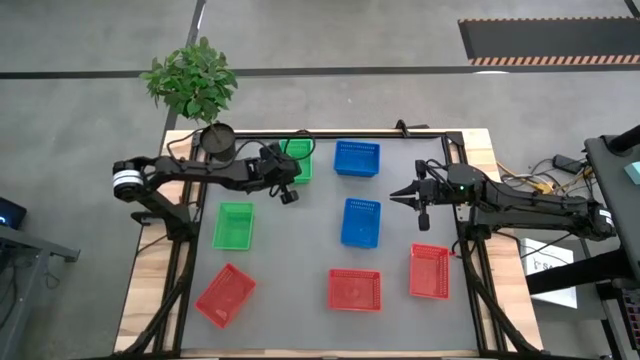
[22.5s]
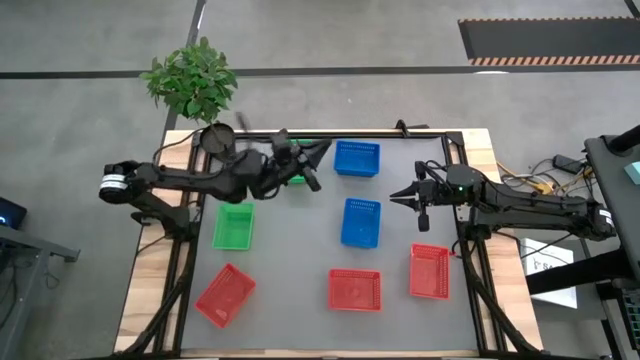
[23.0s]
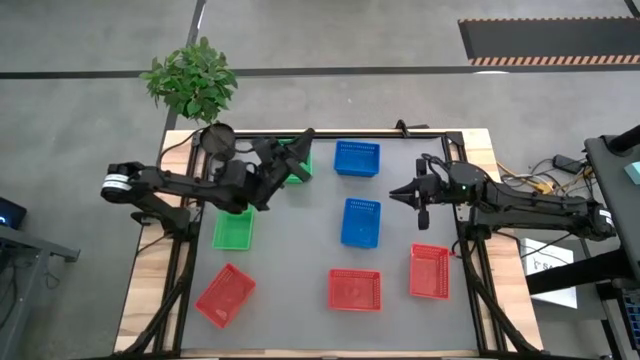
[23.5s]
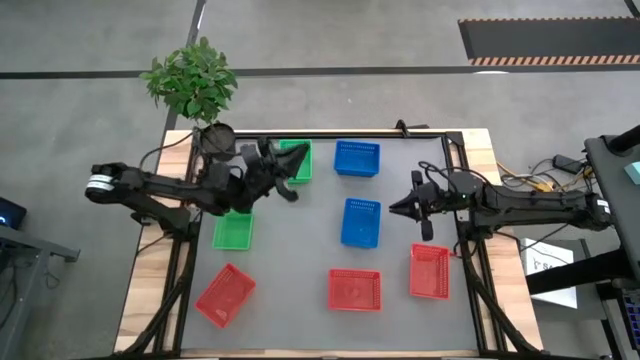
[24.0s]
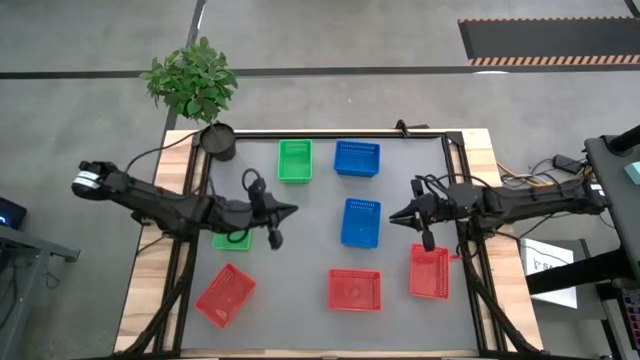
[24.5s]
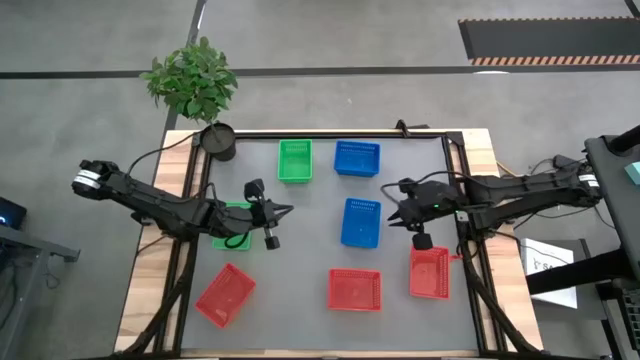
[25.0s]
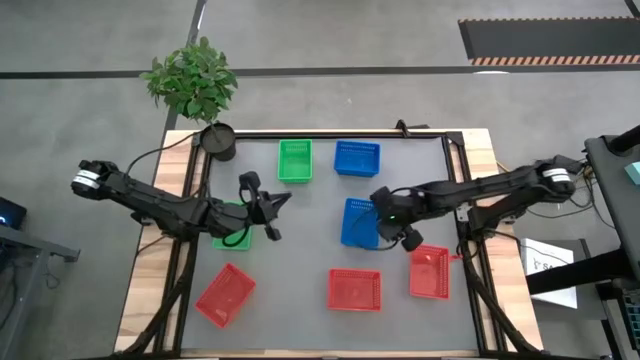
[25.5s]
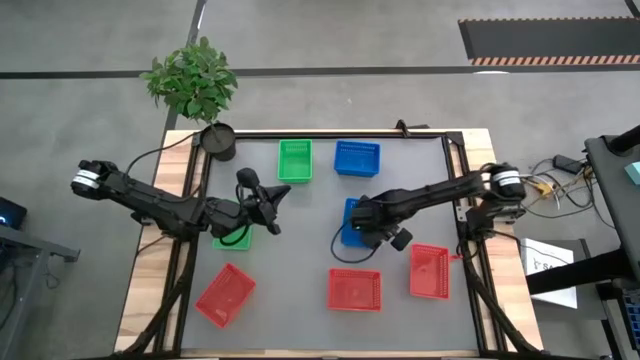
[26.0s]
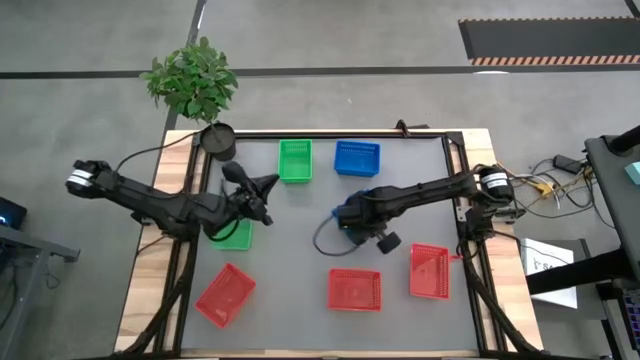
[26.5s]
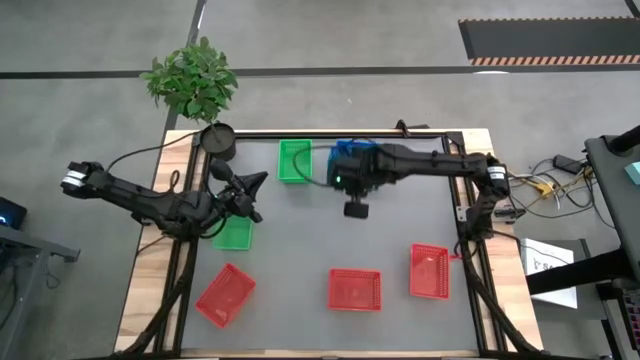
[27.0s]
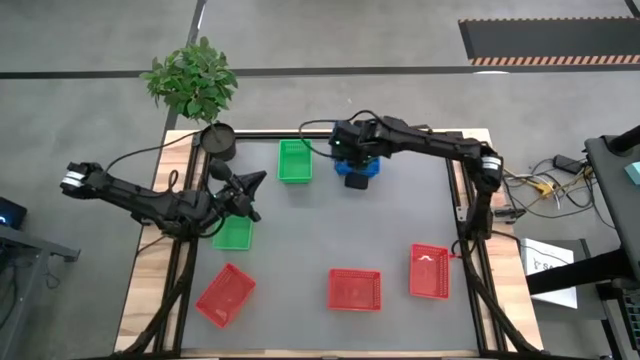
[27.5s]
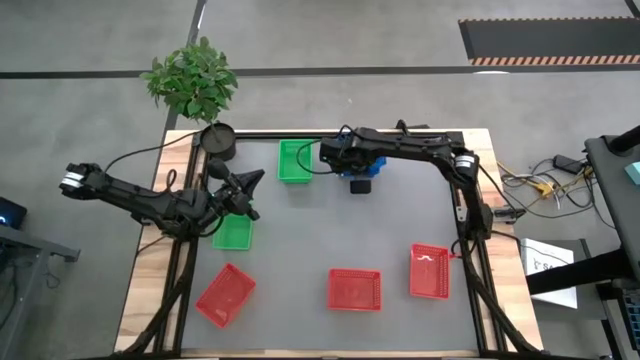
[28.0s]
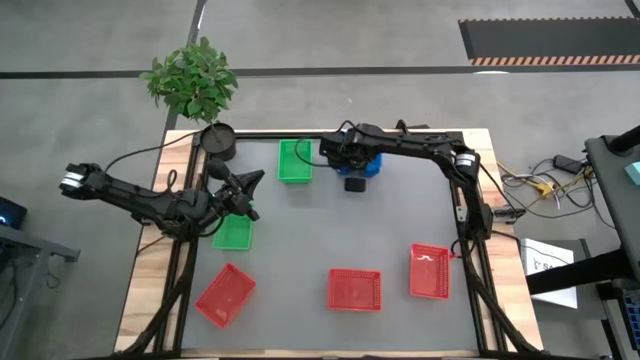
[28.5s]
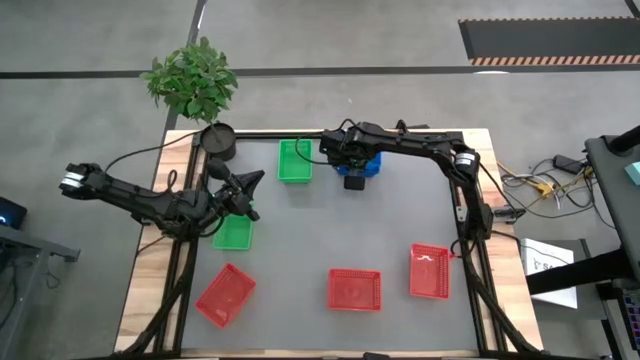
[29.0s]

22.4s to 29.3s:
Stack the bottom blue basket on the top blue basket

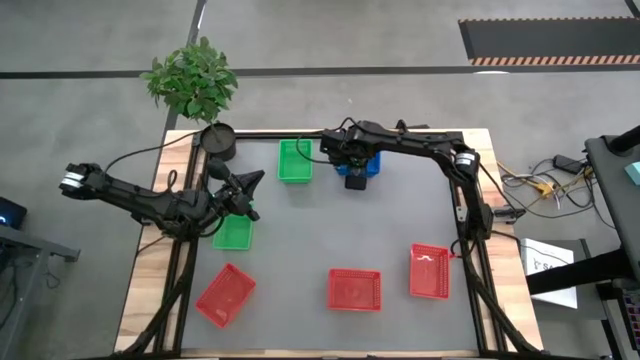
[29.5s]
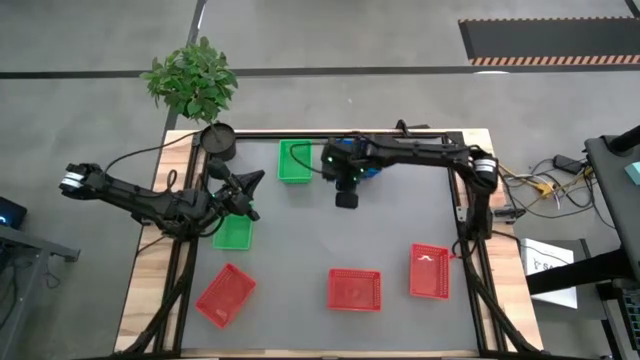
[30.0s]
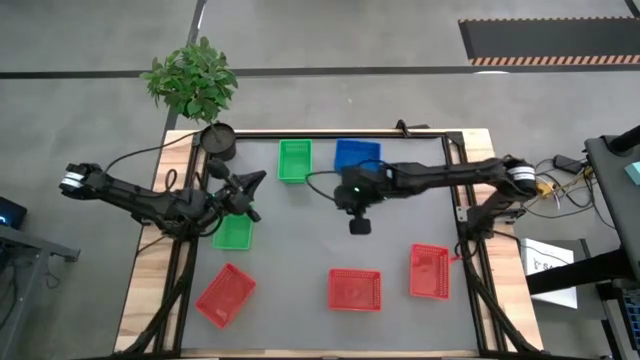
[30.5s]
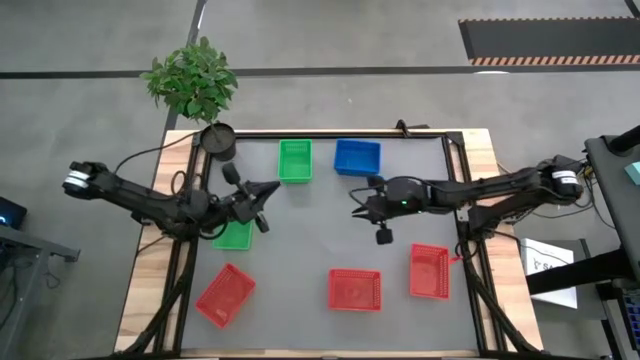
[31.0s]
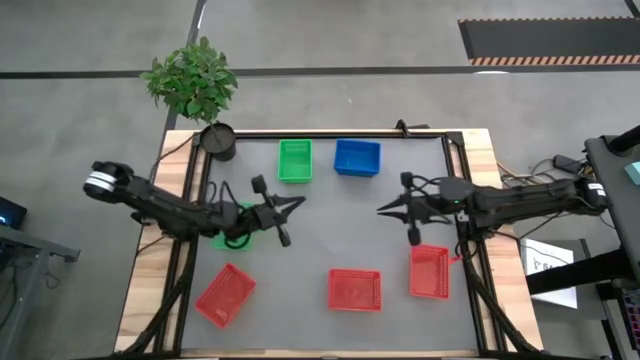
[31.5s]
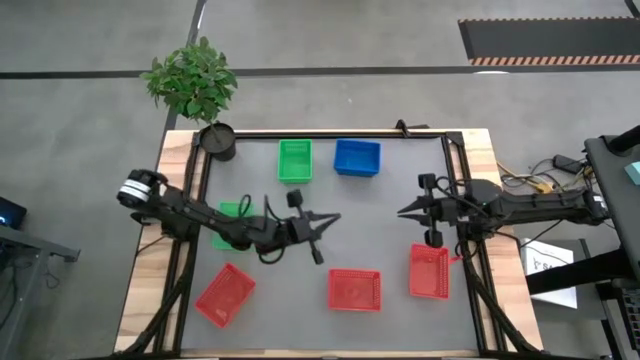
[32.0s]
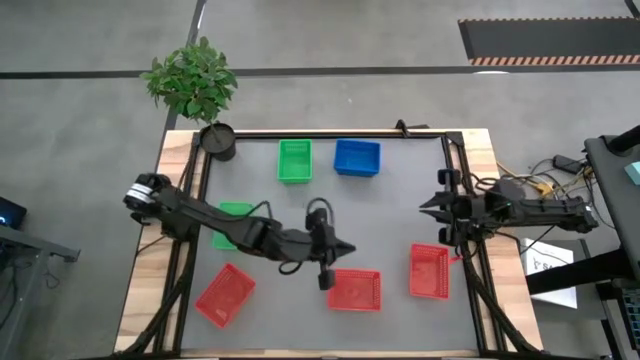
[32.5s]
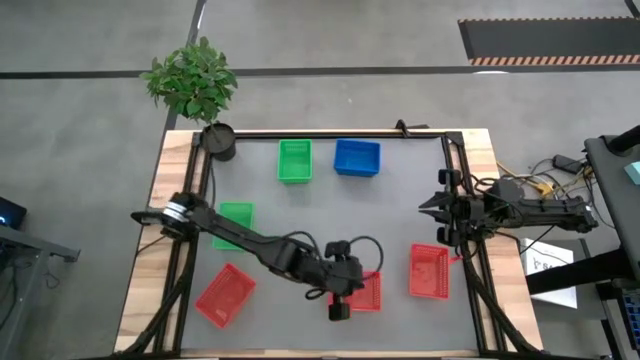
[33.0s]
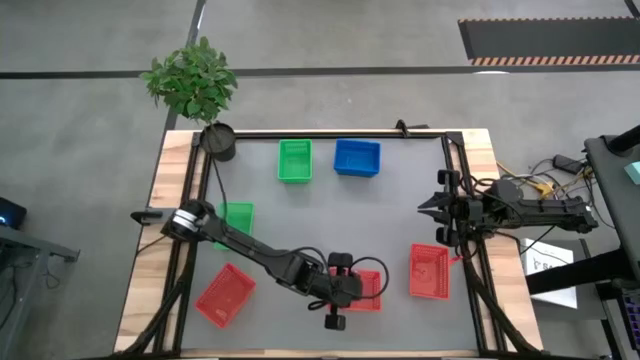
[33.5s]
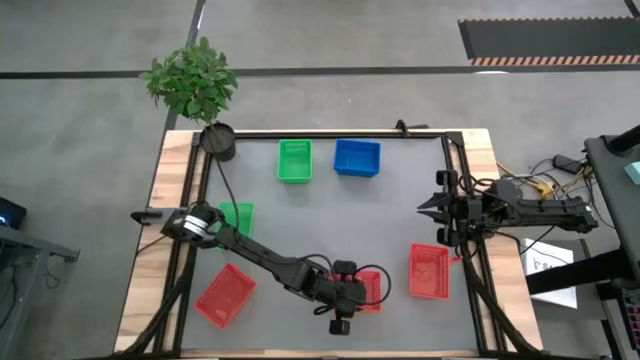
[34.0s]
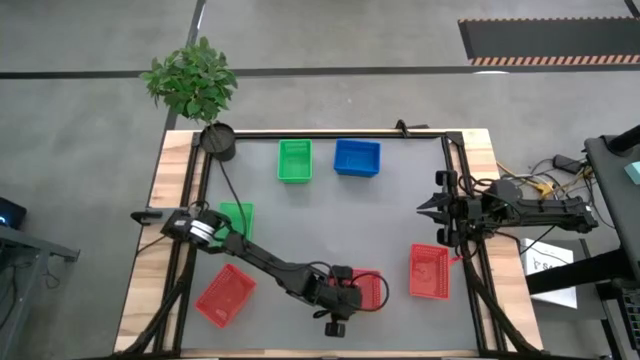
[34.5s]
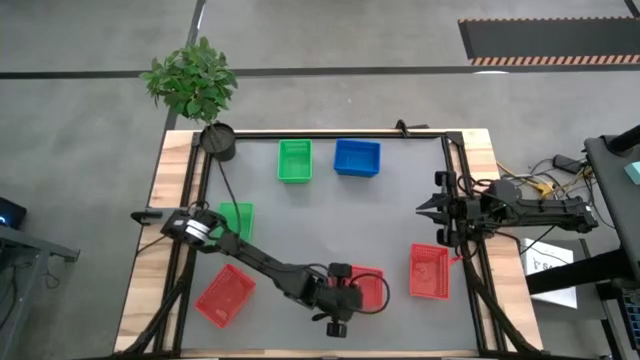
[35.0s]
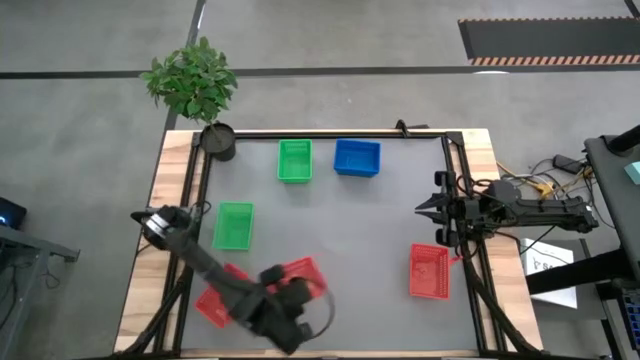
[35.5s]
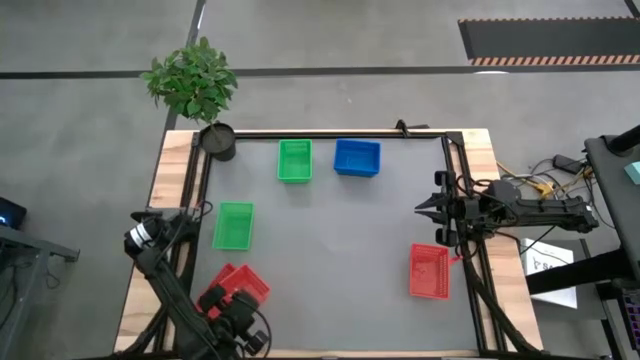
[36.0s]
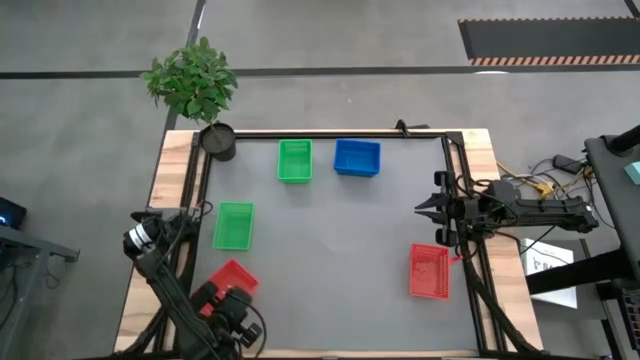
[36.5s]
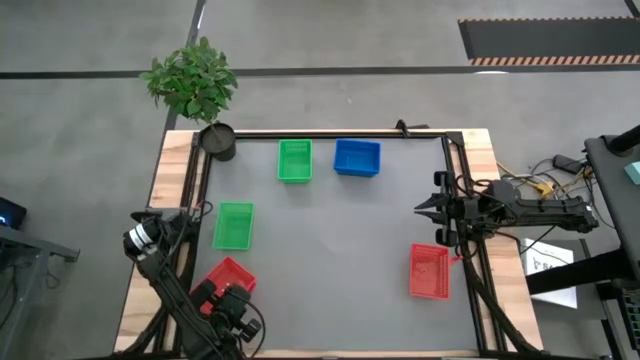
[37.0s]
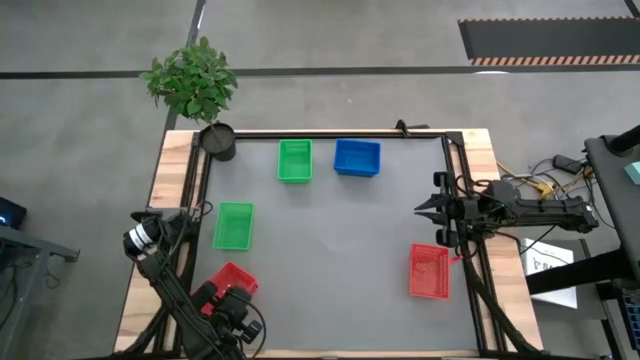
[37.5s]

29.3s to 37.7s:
Stack the middle red basket on the left red basket

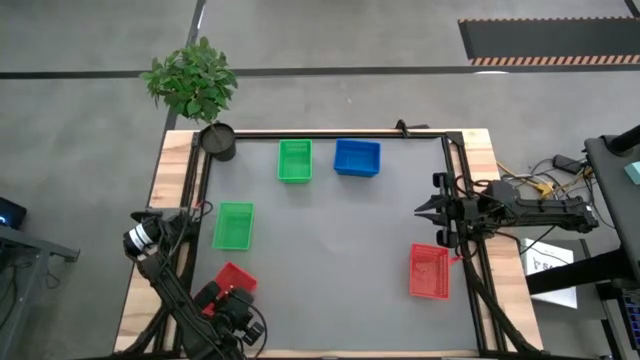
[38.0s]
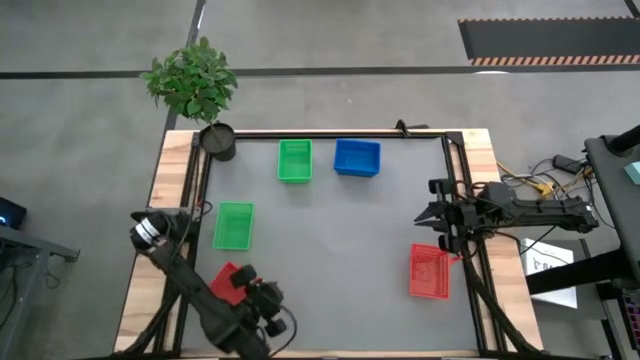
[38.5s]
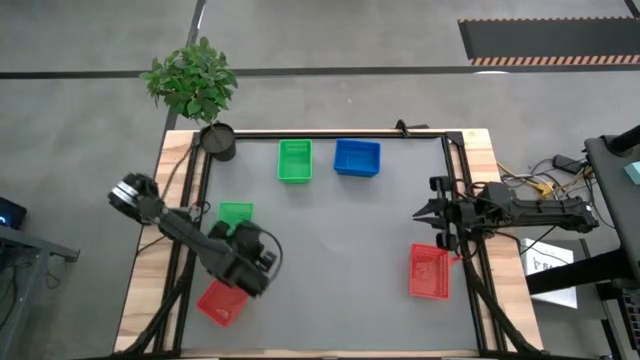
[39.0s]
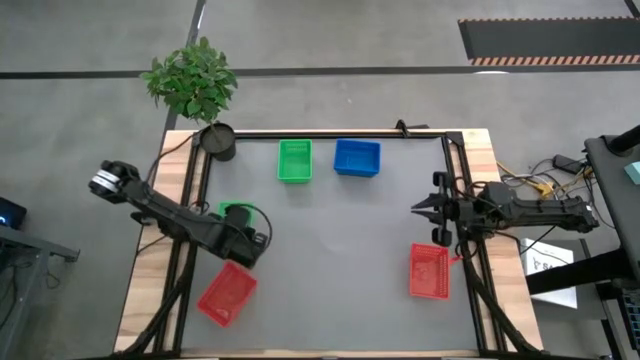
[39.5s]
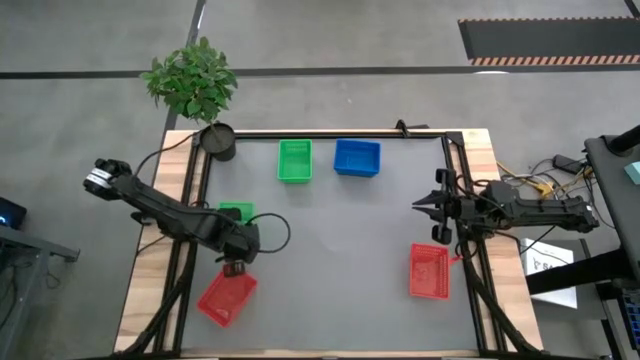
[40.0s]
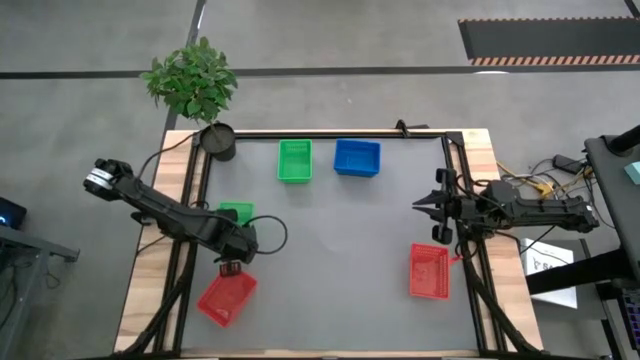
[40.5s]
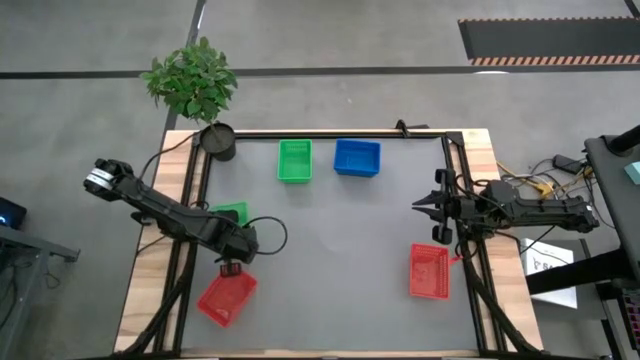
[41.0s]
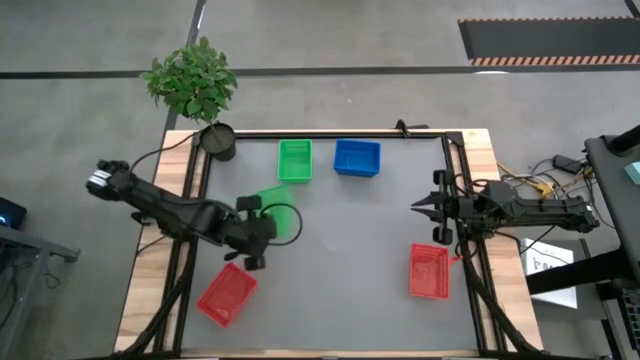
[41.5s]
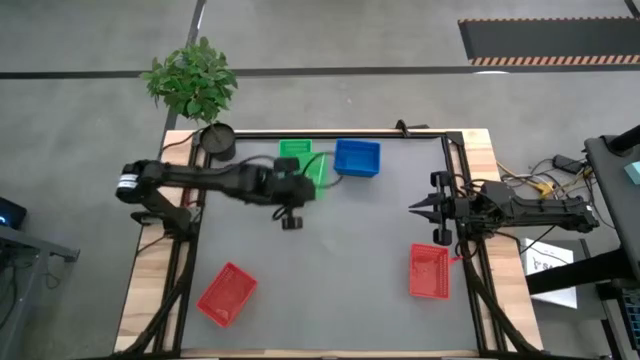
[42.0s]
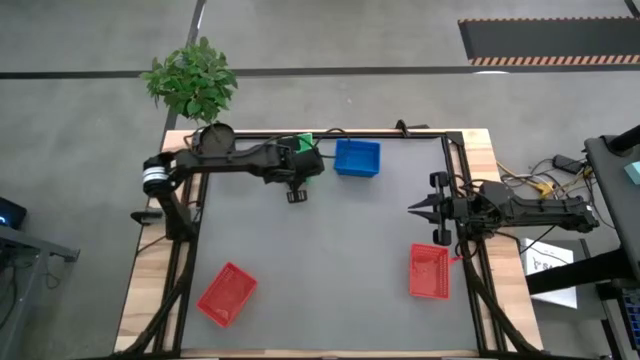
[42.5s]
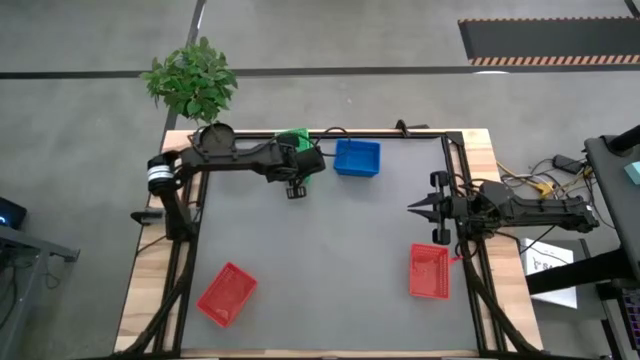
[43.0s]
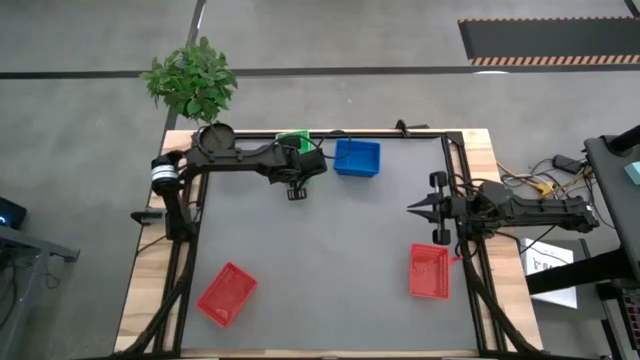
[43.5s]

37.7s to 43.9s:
Stack the bottom green basket on the top green basket
